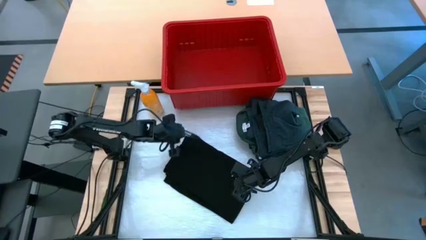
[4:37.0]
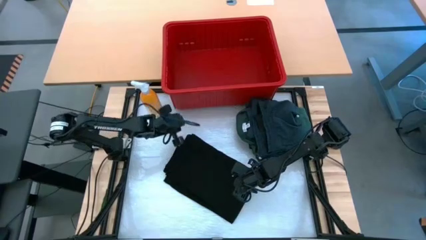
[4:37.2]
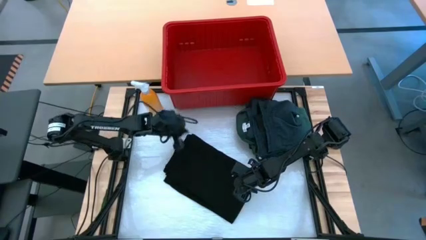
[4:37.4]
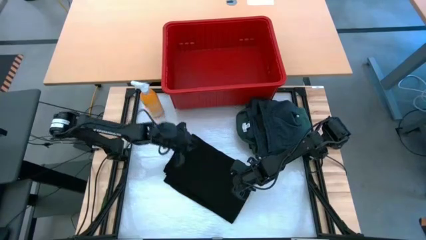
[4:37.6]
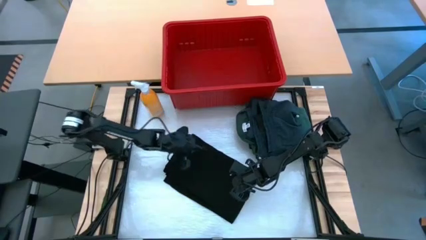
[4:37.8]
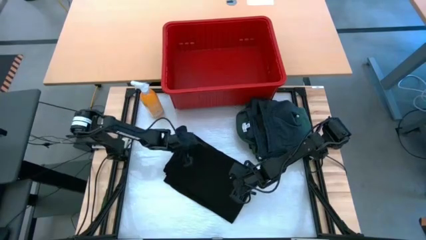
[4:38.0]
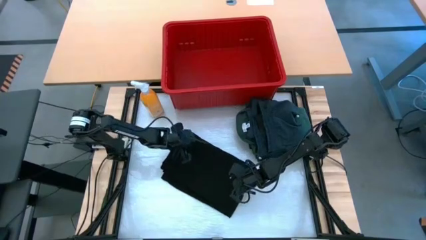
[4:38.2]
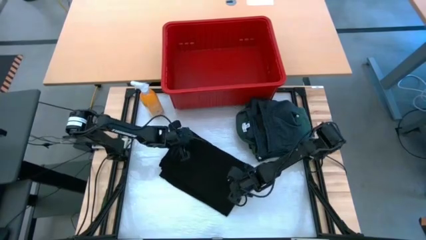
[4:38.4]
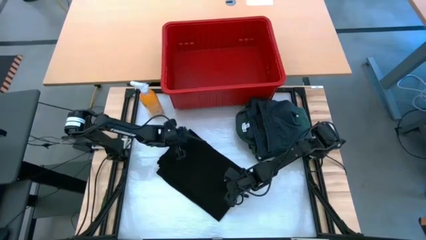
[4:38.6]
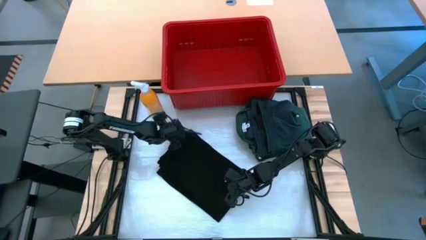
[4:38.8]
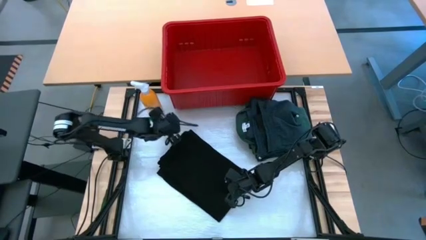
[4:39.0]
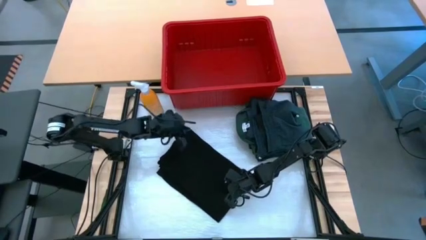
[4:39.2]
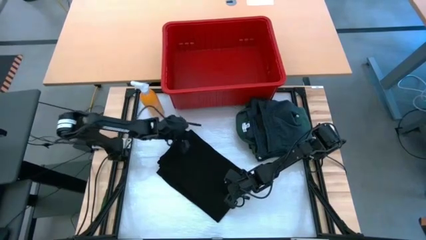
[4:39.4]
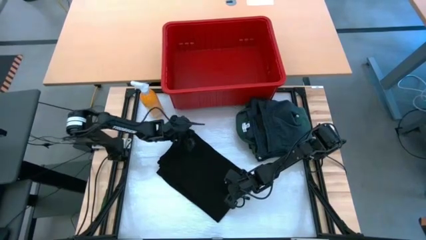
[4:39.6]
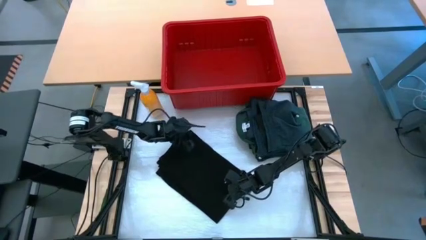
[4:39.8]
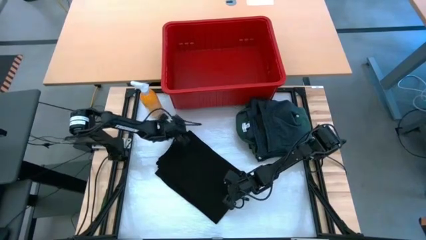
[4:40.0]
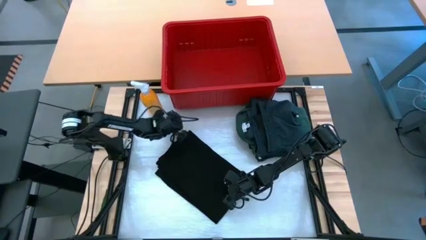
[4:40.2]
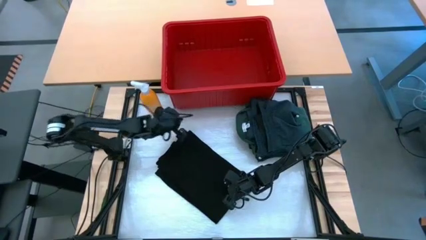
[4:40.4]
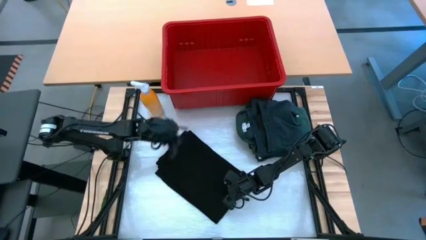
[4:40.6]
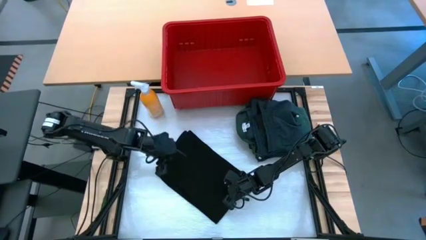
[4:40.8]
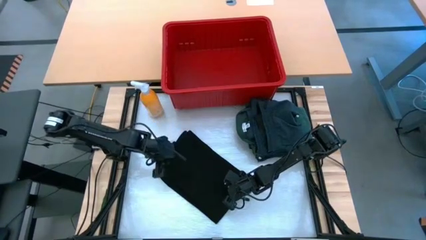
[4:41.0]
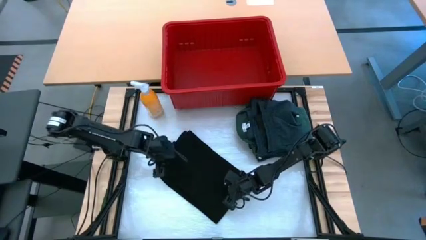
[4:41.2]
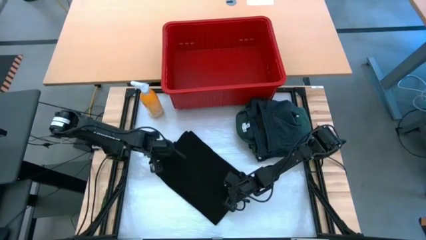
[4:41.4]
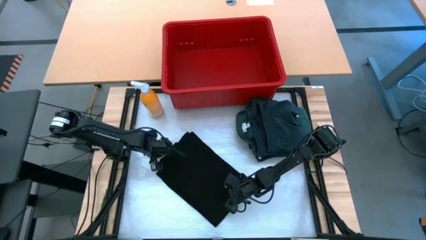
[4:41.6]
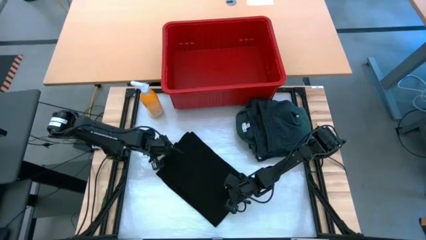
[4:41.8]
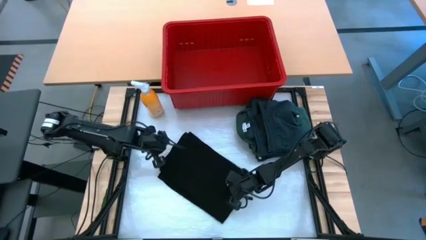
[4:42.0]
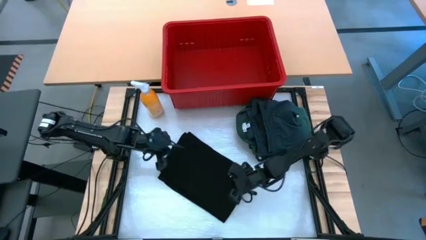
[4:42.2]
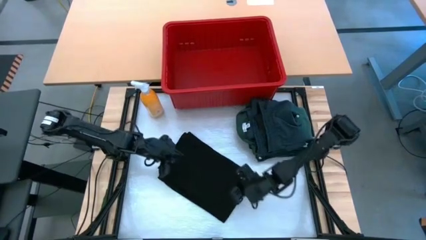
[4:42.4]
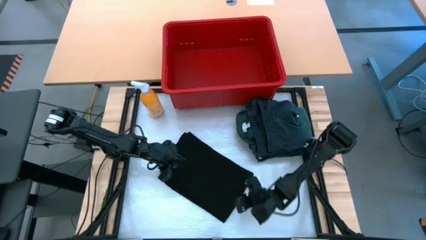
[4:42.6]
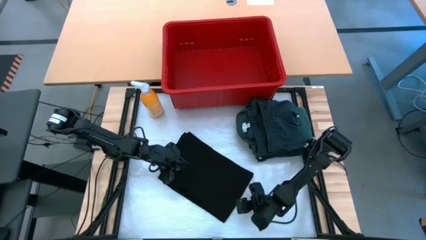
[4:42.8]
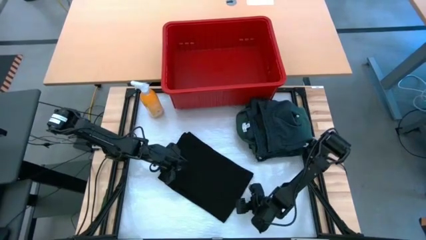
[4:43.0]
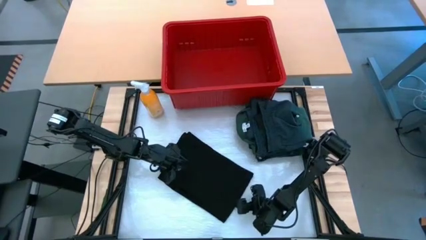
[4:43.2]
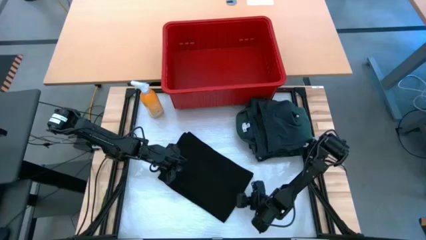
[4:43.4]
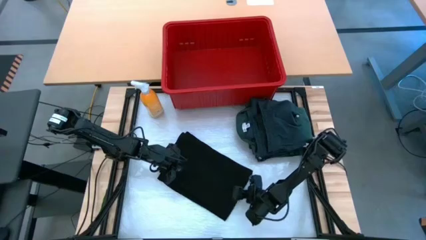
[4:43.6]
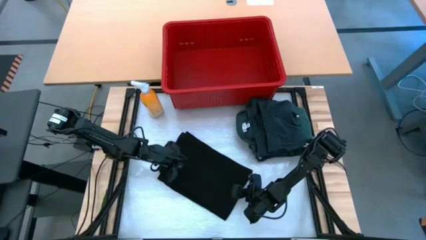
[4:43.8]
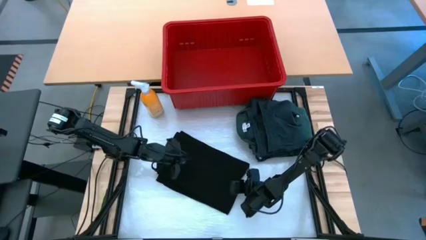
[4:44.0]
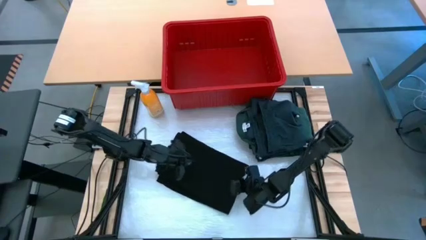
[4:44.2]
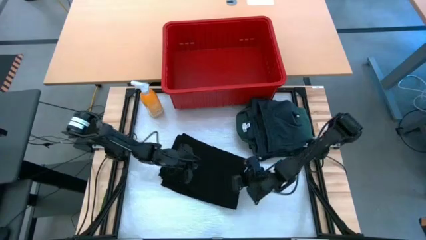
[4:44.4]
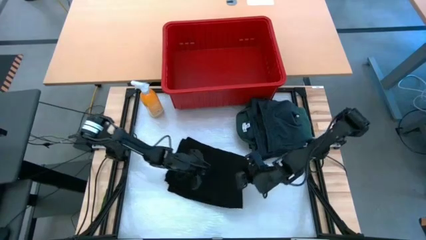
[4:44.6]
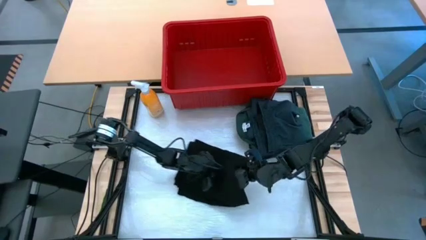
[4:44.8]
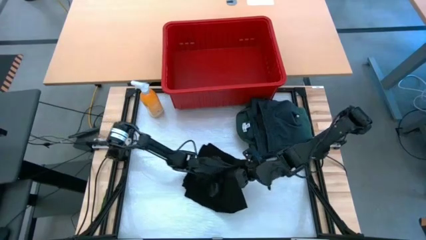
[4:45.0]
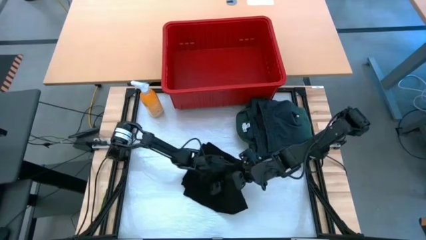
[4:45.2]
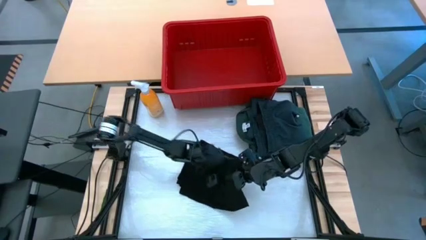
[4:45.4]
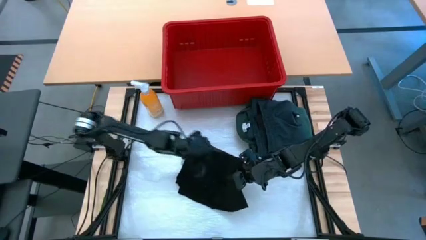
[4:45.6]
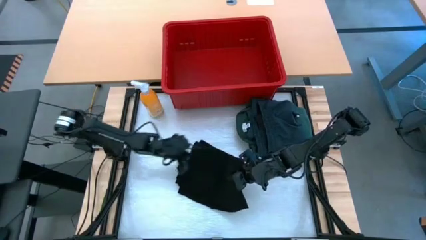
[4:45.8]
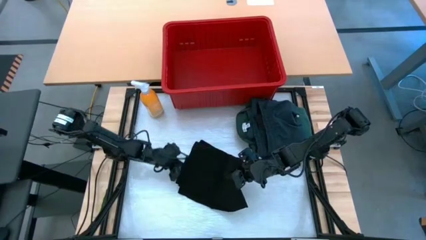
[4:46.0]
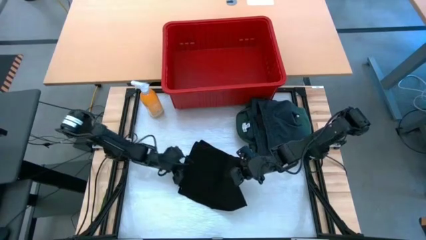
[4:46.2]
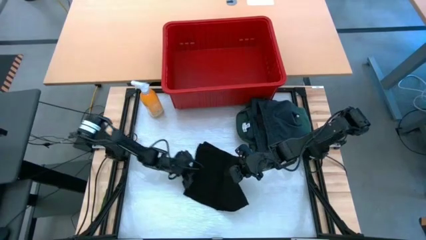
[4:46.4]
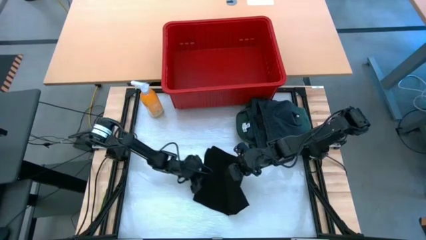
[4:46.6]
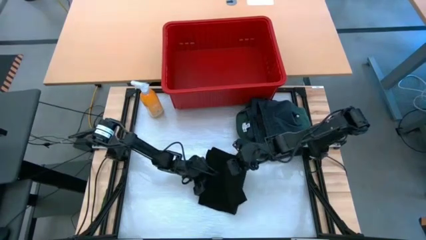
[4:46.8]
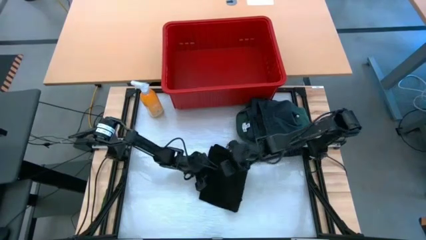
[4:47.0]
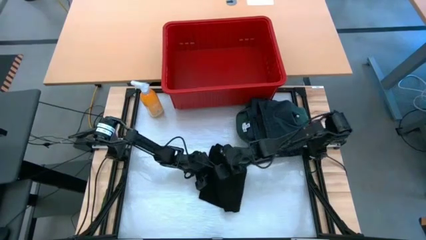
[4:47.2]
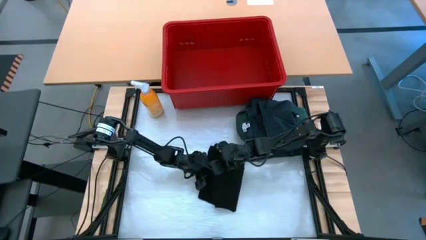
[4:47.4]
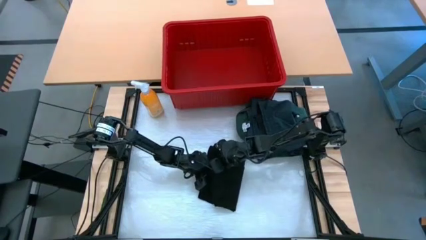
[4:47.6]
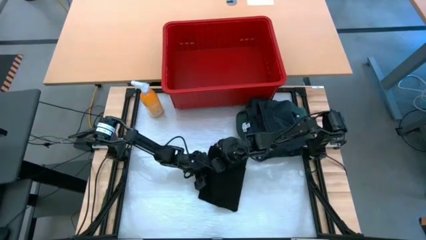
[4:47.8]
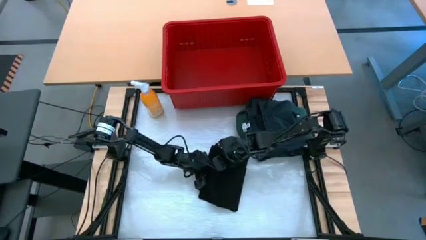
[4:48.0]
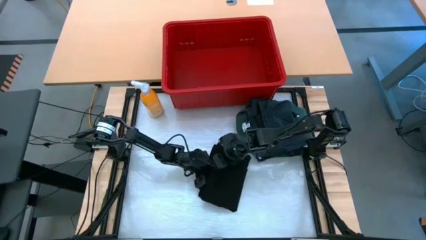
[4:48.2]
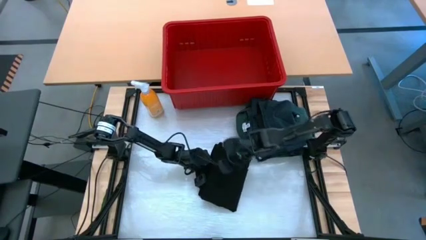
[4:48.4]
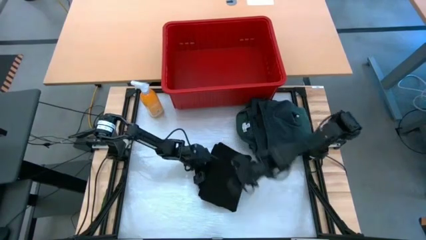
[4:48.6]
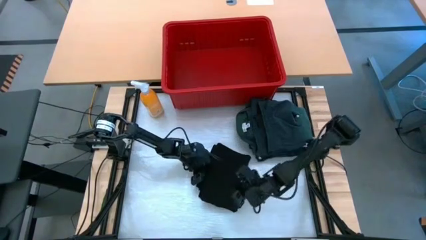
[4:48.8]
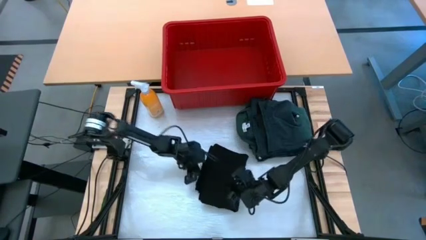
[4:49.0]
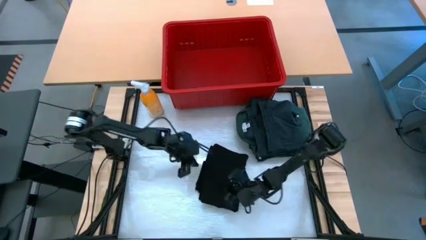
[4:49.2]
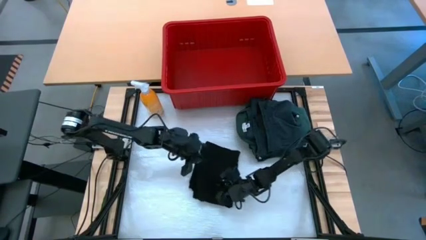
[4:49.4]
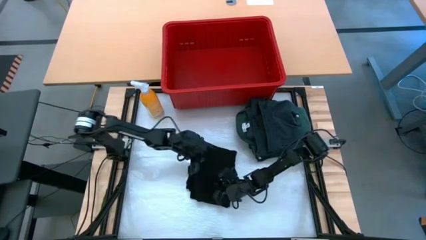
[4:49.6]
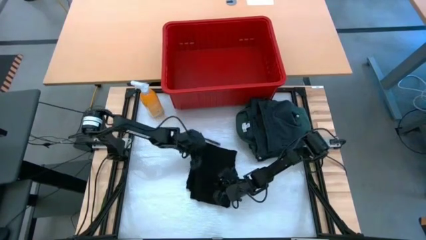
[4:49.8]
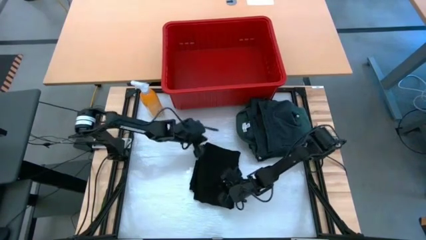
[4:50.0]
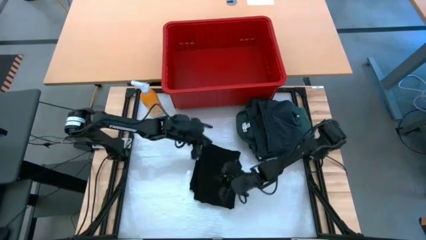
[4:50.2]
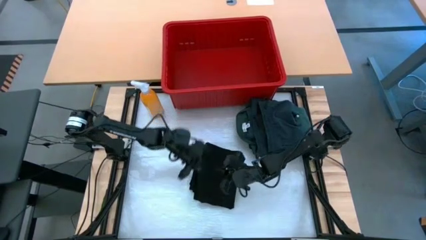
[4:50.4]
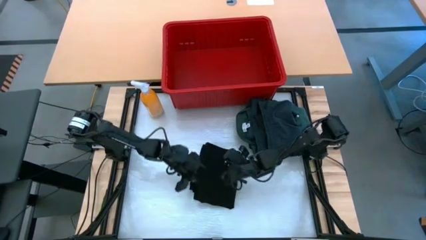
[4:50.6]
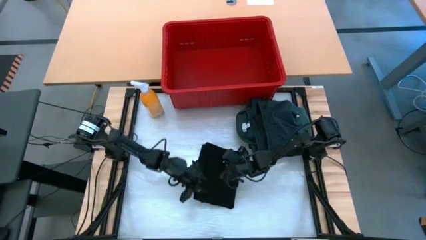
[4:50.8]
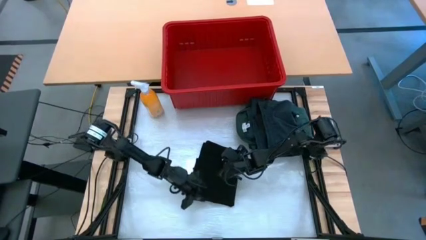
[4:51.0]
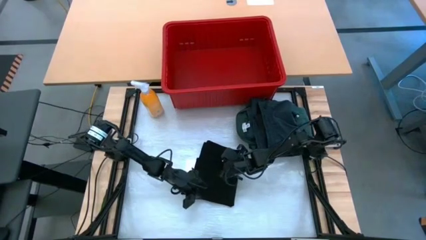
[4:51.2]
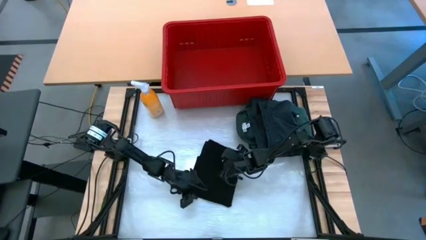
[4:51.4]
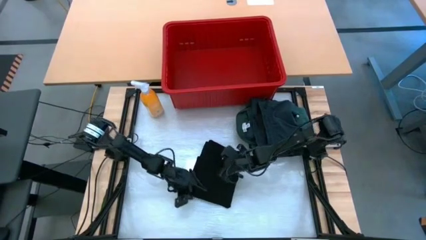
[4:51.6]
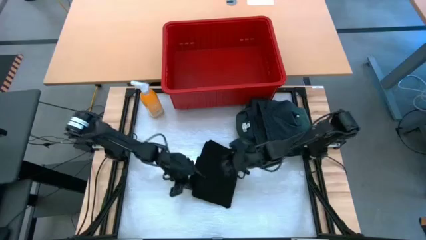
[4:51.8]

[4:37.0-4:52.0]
Task: Fold Laundry from Bin
Fold the black shirt
